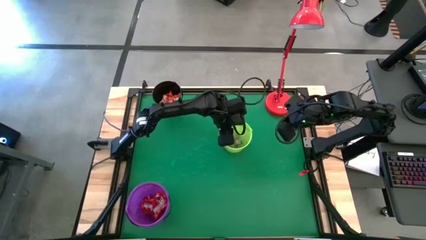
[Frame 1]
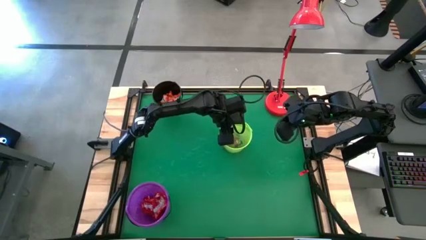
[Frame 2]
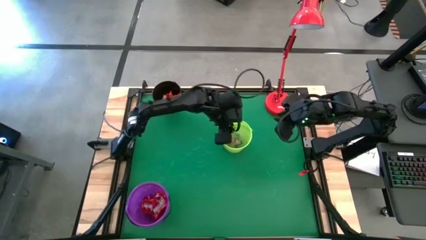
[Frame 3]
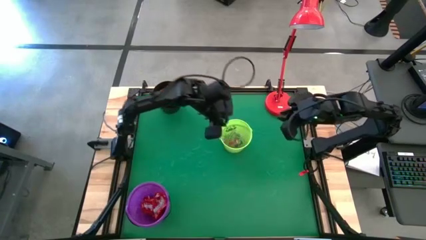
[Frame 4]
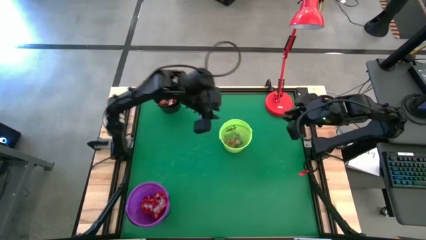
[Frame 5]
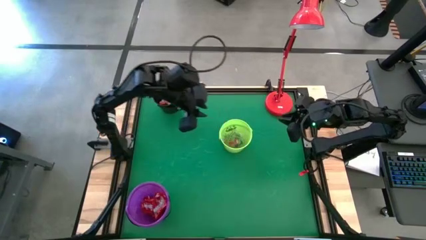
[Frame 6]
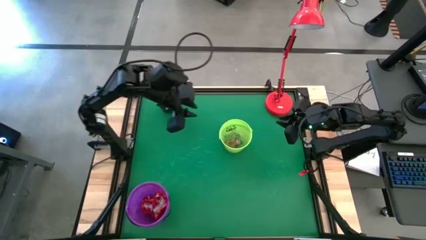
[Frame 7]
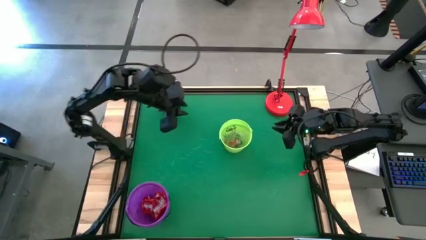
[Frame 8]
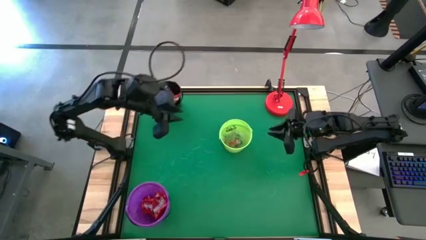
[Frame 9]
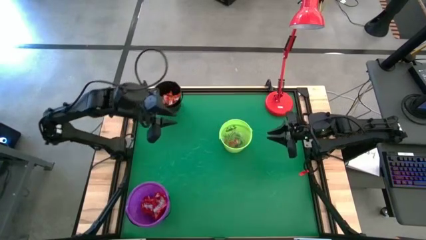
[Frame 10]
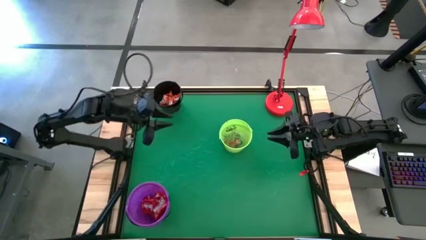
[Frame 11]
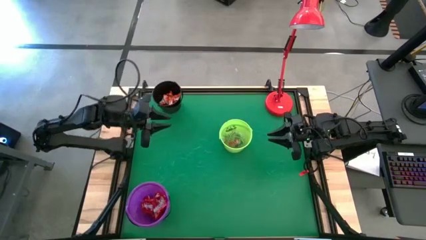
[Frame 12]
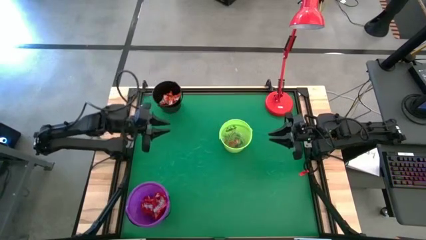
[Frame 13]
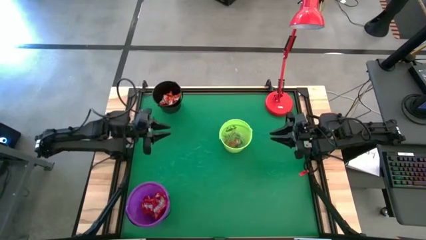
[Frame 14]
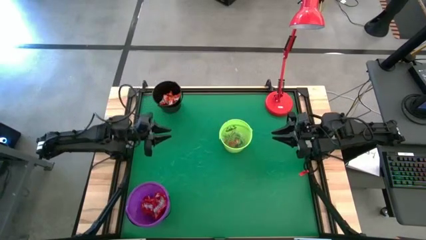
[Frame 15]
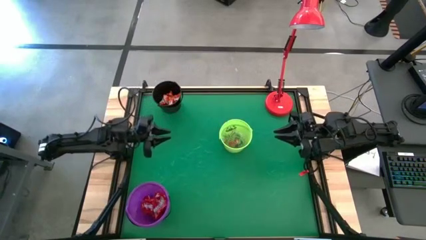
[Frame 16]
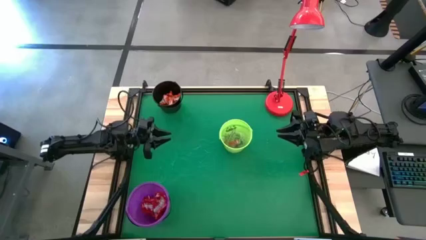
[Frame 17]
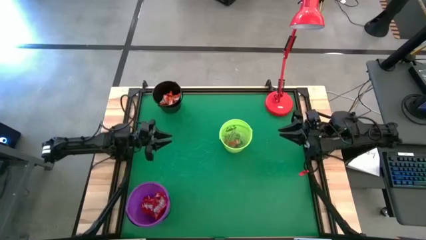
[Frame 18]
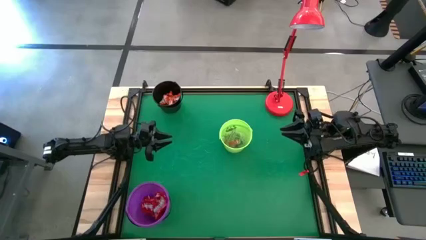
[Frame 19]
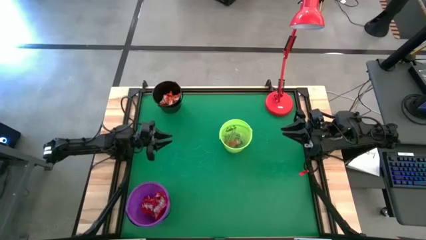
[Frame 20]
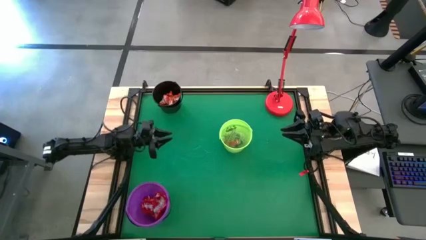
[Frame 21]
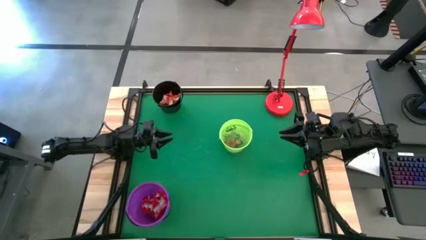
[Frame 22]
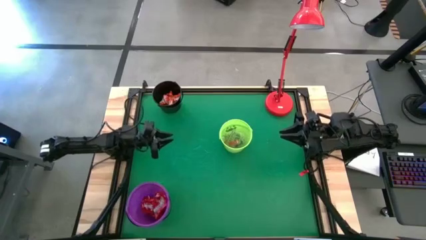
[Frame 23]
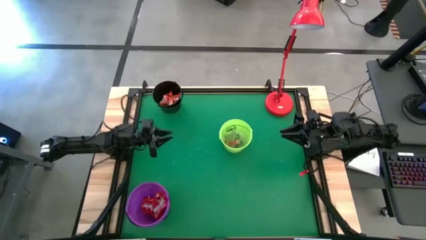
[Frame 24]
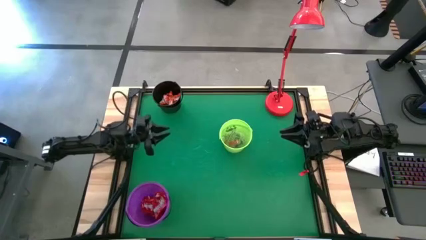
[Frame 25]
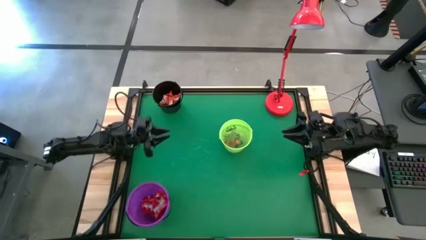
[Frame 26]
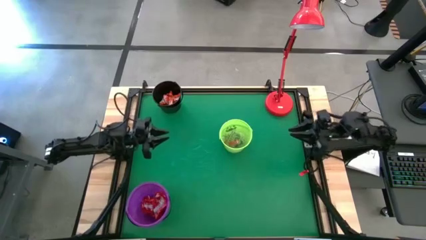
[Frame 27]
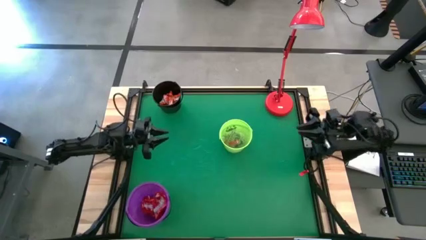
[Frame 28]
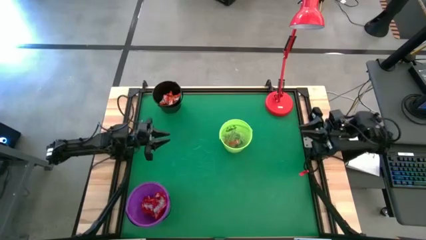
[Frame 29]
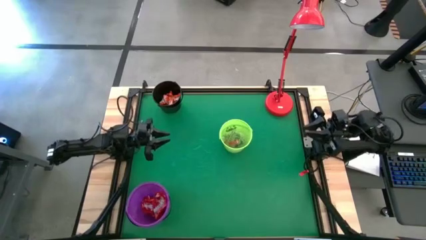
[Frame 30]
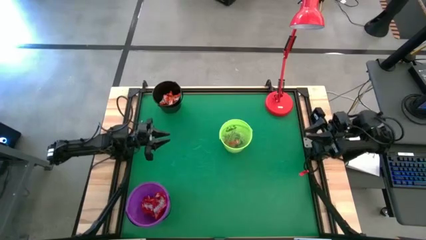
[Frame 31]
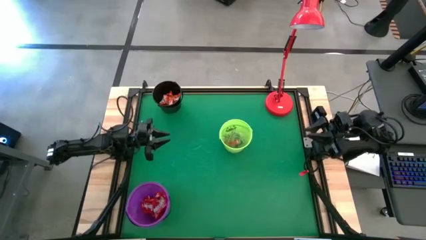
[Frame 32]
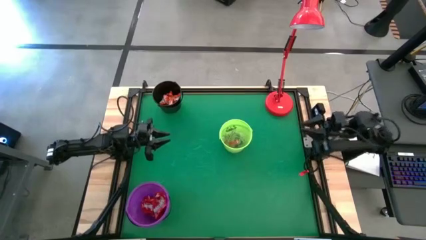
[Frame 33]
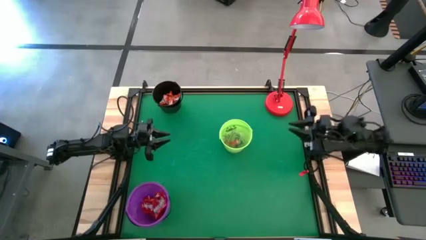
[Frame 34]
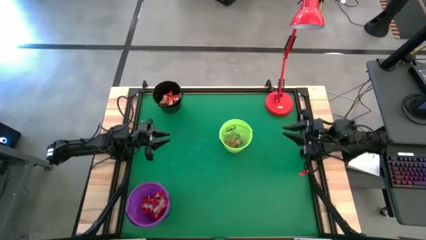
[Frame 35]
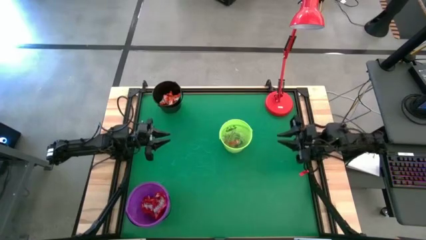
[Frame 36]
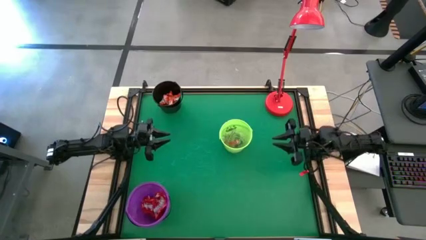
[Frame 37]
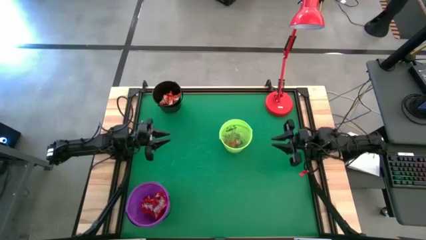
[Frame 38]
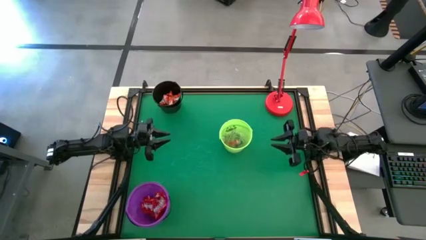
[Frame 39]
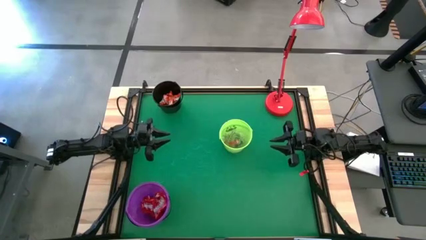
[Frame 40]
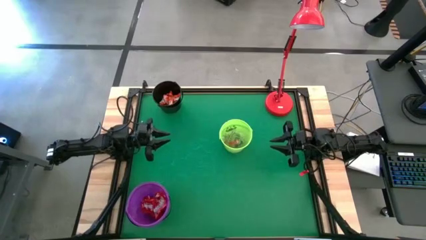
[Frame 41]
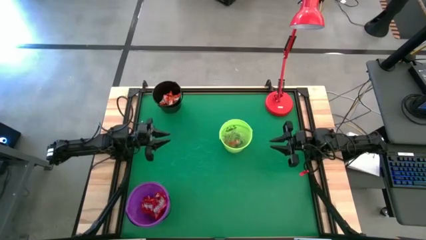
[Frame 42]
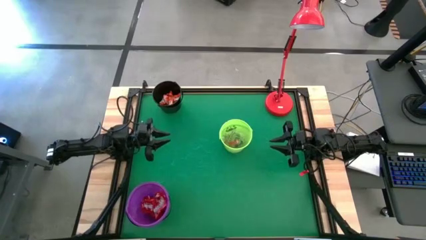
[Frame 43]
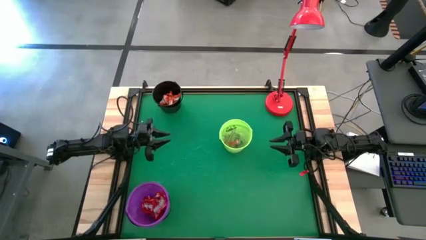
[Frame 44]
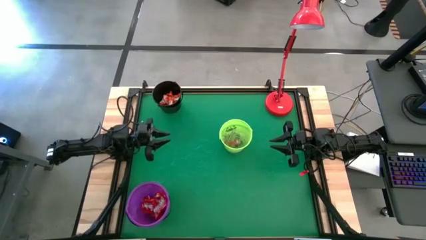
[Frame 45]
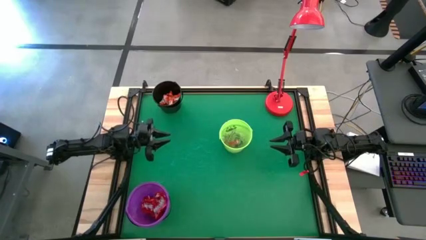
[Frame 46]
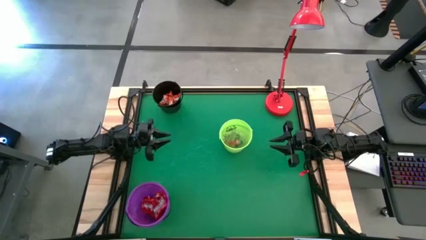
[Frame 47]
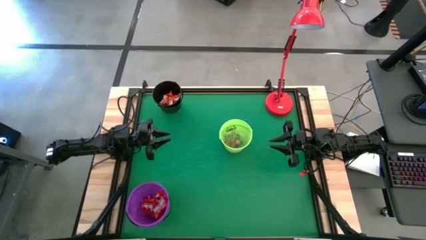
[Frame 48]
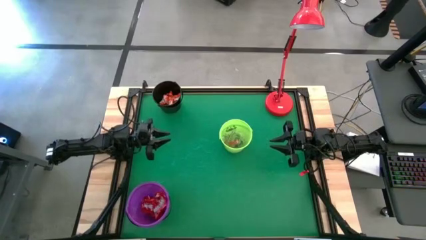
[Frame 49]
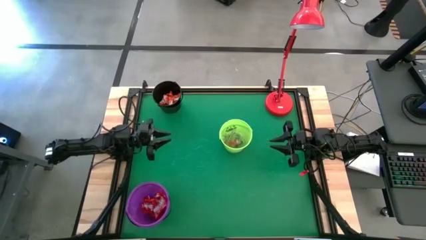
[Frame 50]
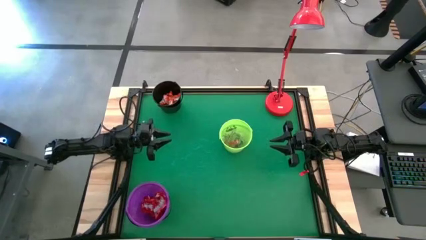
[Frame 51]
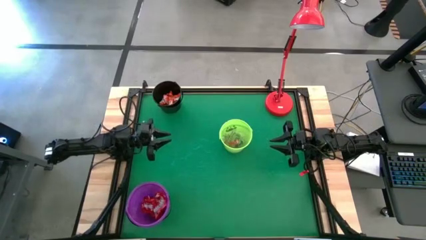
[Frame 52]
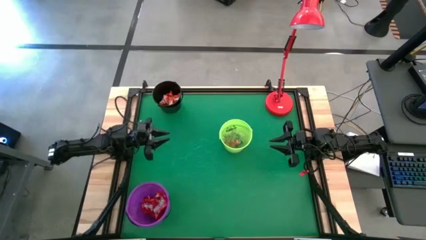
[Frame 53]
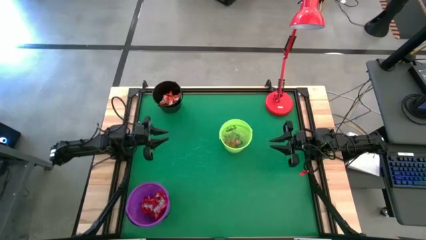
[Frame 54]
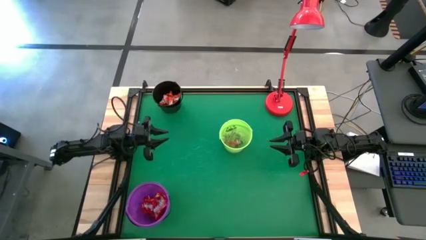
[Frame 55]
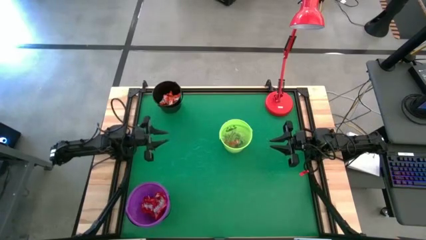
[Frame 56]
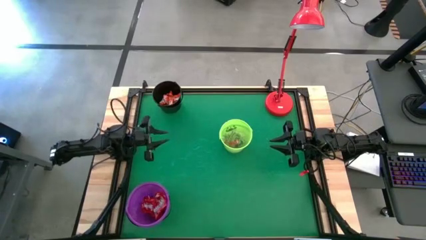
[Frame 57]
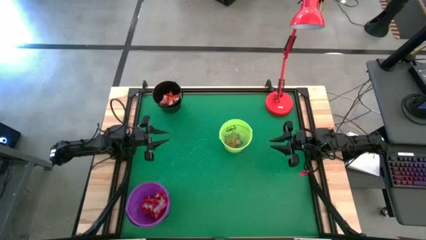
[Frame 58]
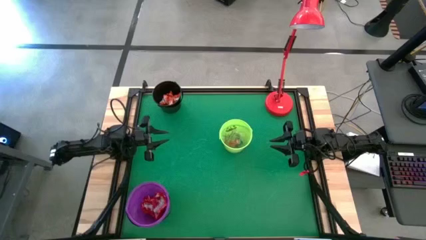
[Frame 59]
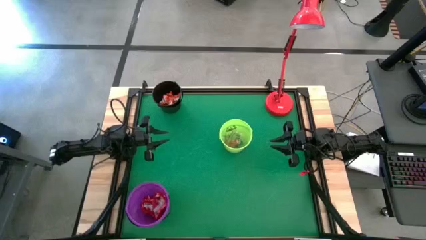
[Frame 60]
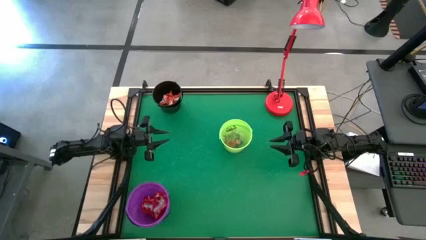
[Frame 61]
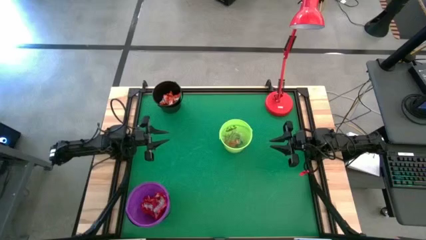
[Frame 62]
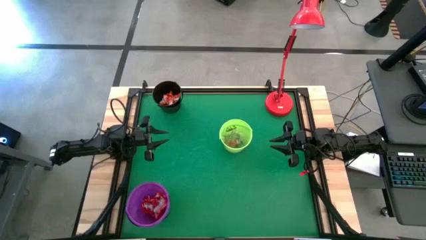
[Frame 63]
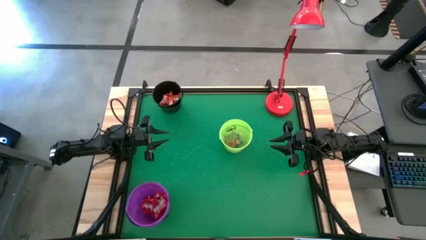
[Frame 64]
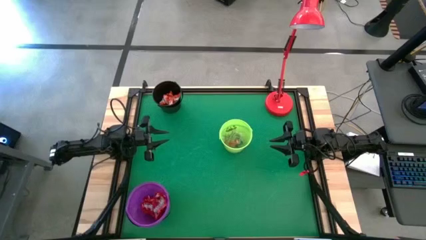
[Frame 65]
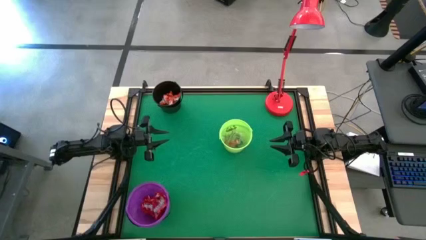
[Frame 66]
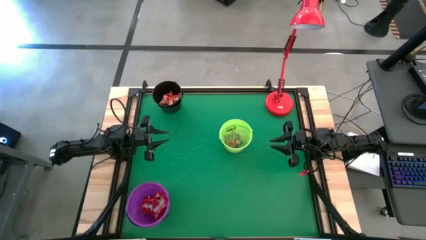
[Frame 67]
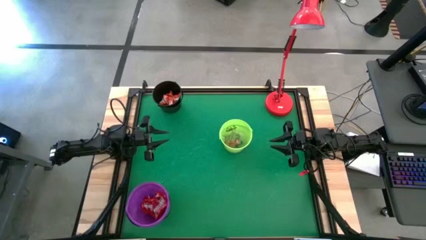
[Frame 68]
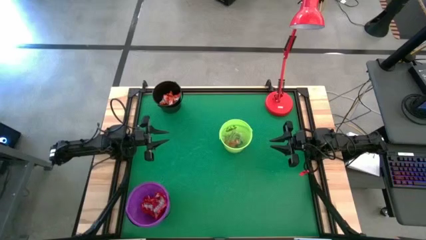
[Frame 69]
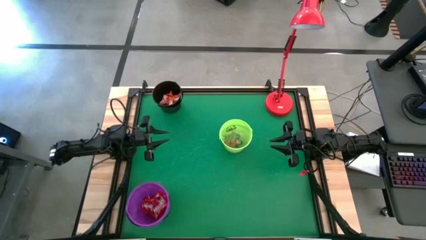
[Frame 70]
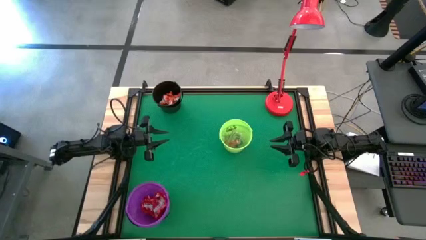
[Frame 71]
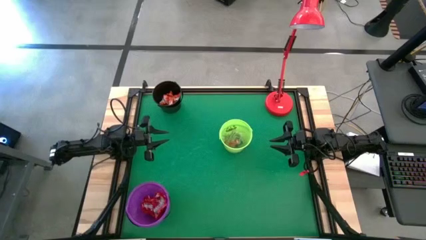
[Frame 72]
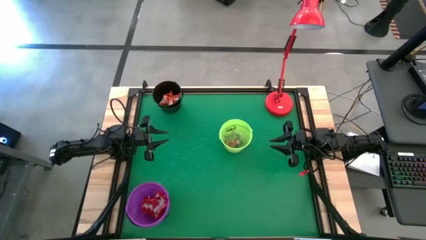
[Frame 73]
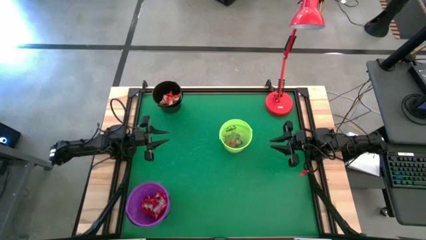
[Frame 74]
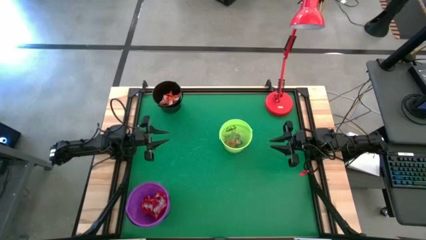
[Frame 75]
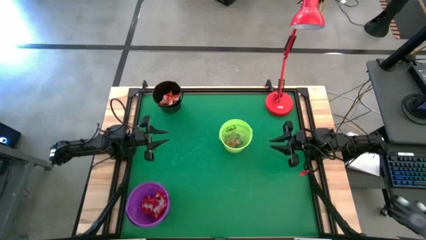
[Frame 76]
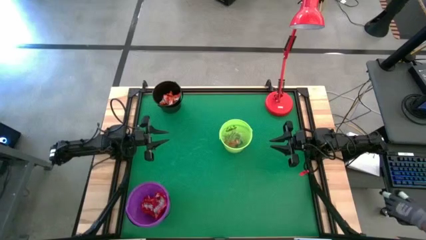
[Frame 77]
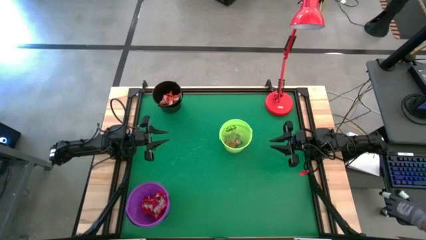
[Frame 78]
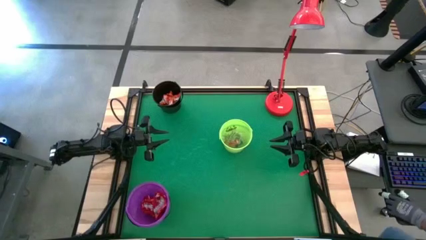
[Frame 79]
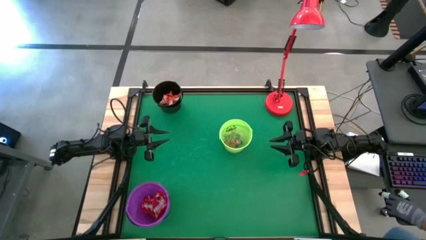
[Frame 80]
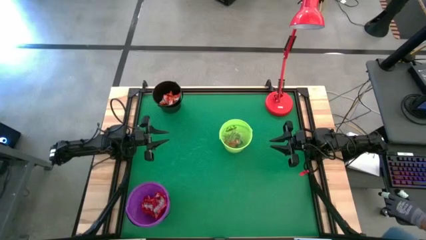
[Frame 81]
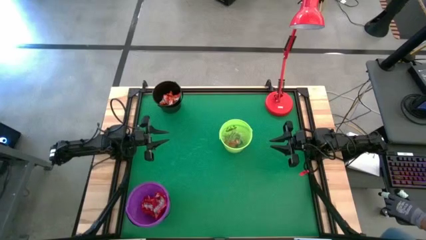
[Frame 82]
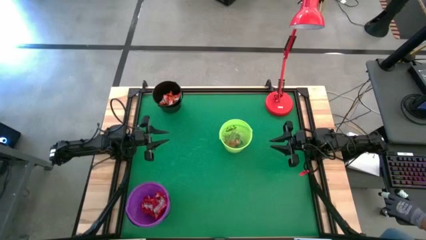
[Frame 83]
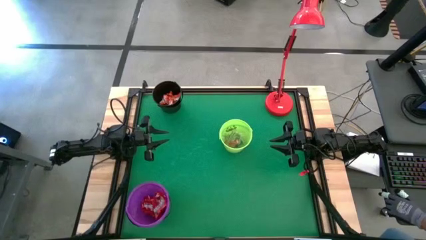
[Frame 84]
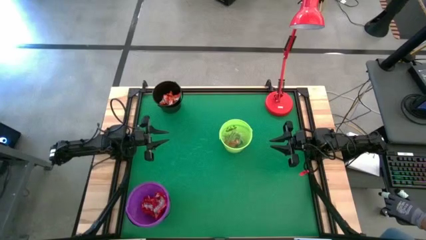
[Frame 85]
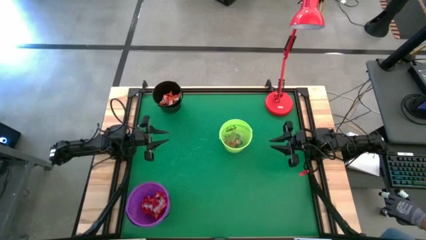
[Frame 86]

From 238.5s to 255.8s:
Task: Sort candy
Return to Home Position
